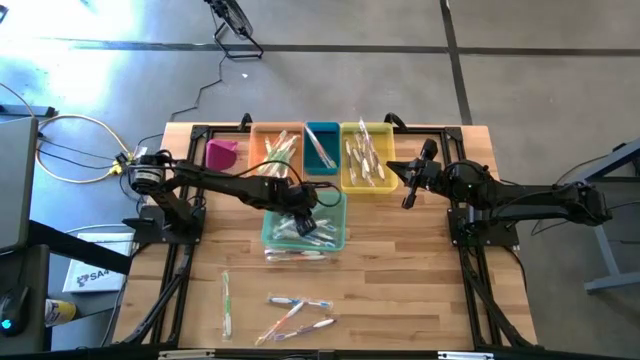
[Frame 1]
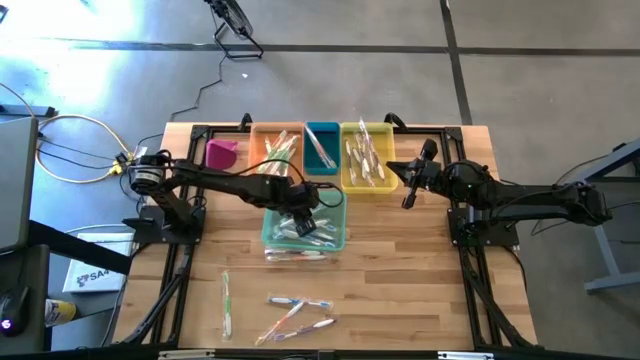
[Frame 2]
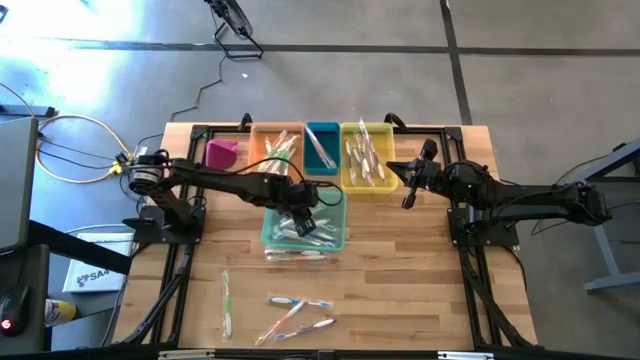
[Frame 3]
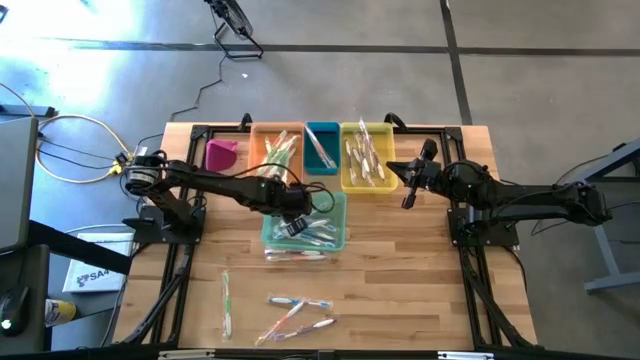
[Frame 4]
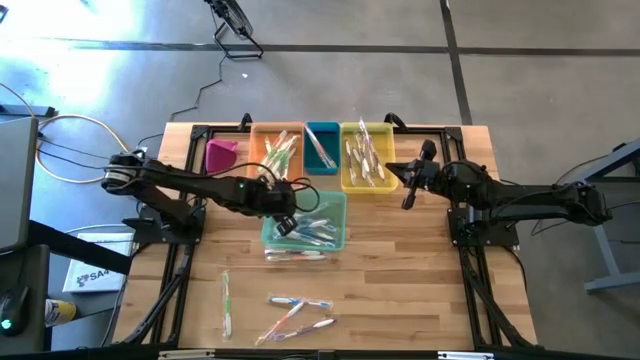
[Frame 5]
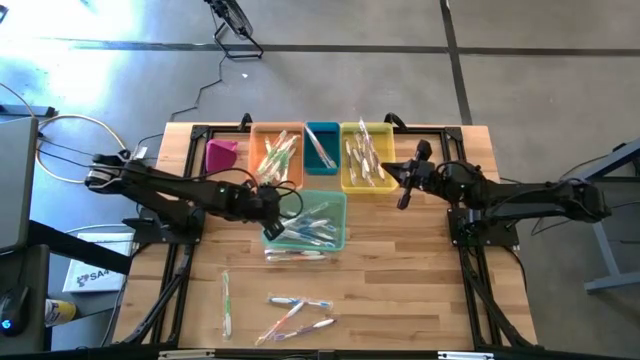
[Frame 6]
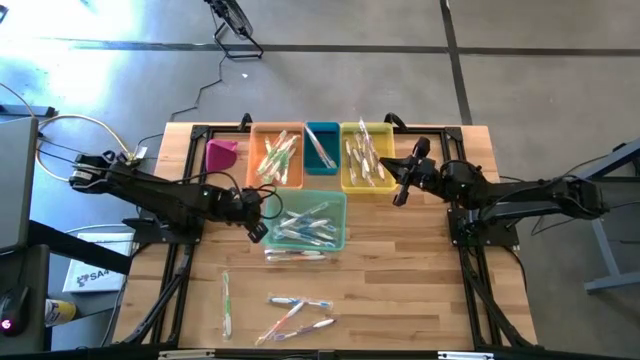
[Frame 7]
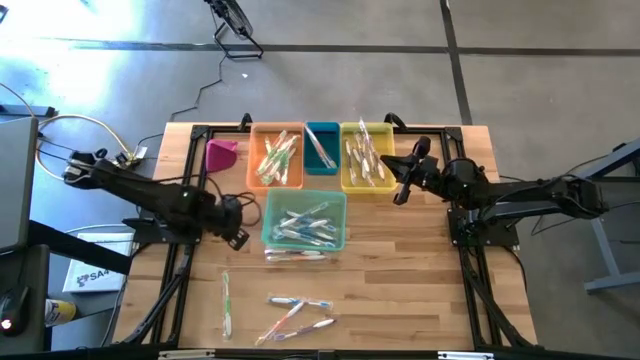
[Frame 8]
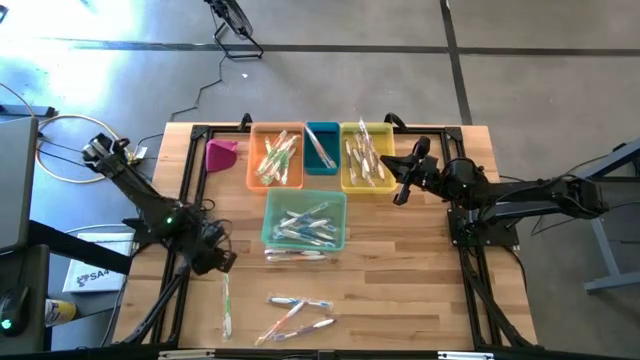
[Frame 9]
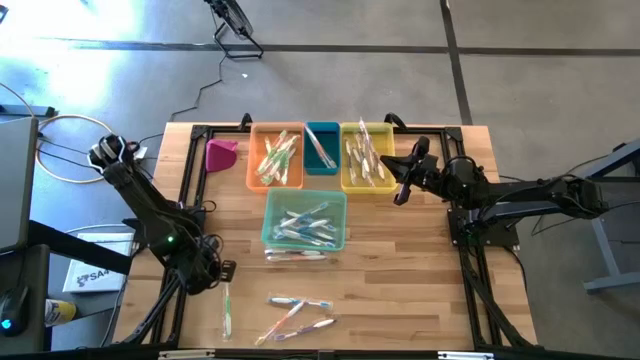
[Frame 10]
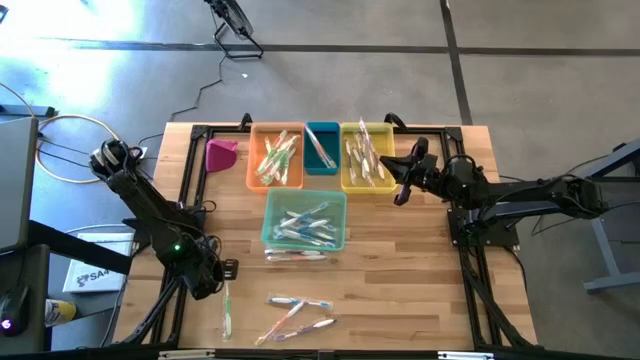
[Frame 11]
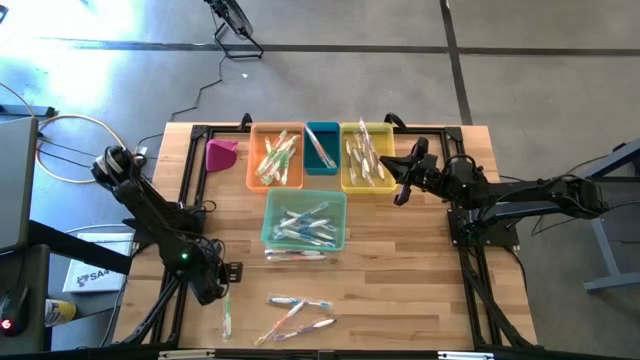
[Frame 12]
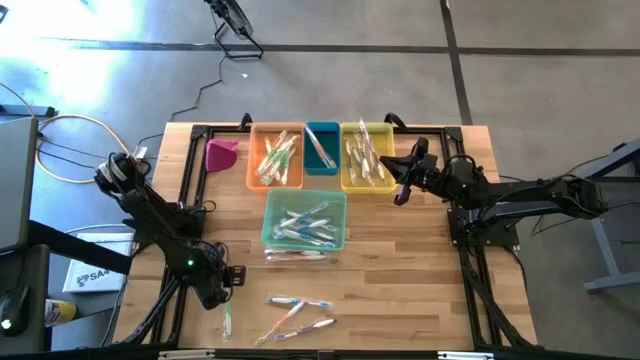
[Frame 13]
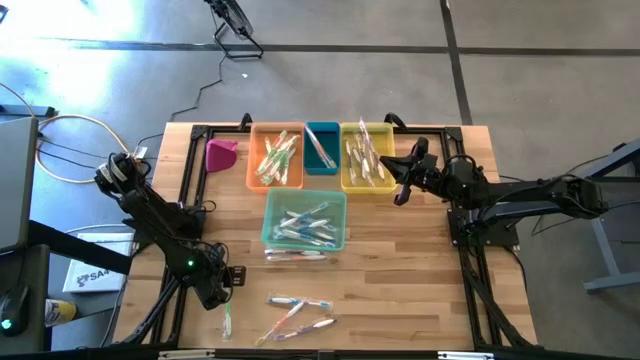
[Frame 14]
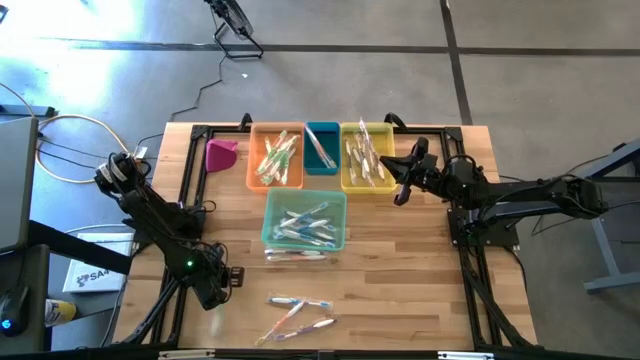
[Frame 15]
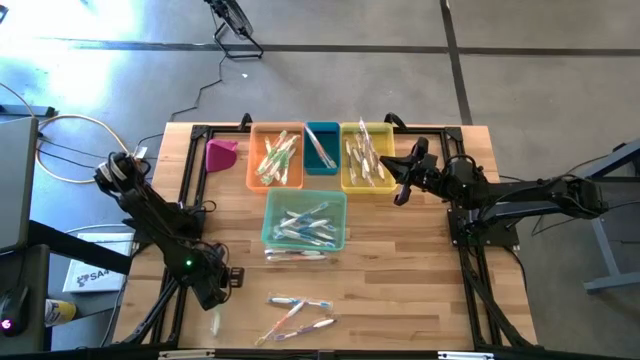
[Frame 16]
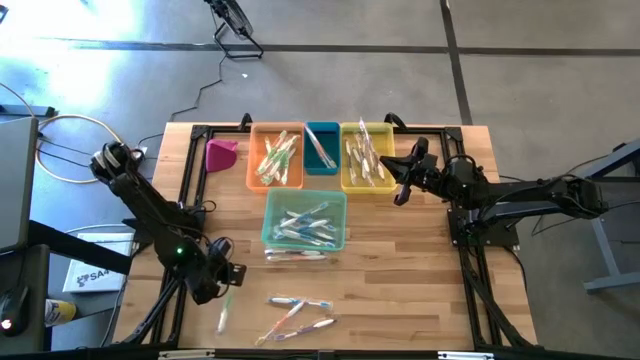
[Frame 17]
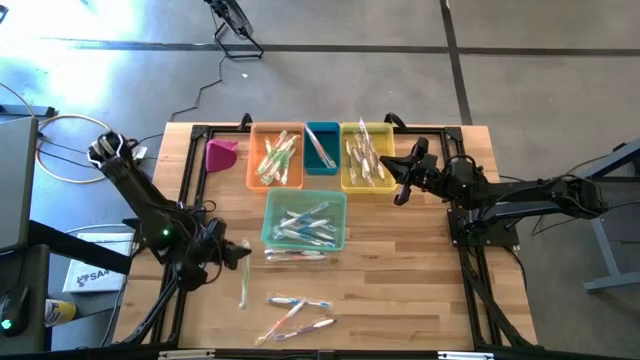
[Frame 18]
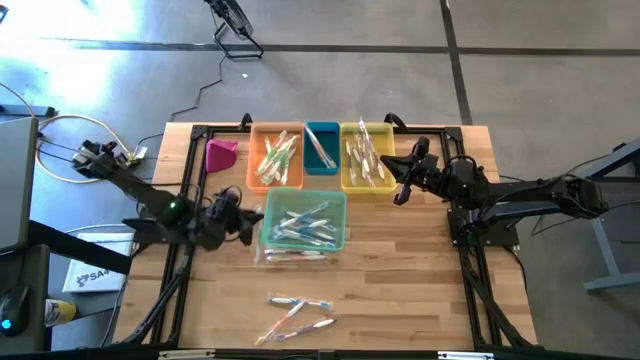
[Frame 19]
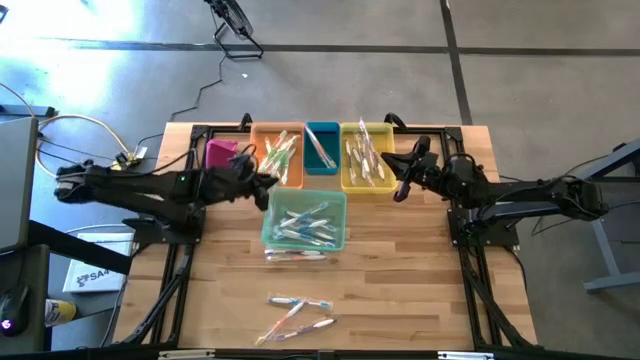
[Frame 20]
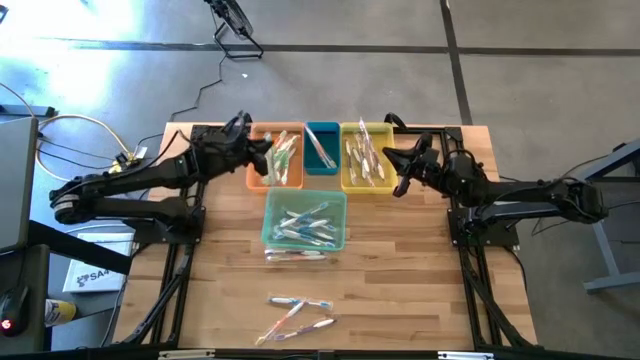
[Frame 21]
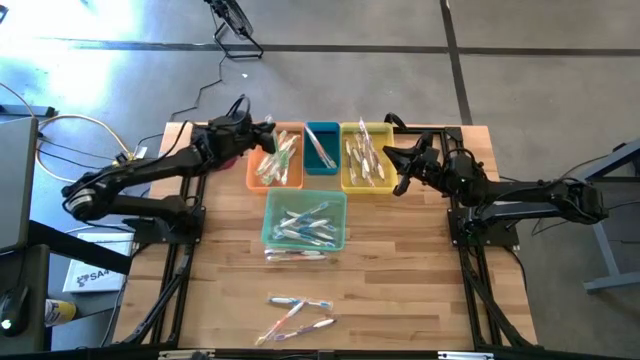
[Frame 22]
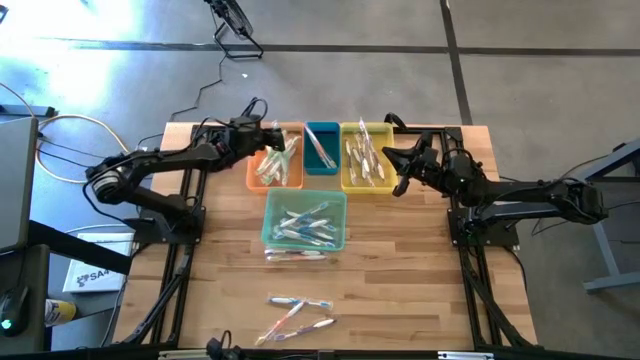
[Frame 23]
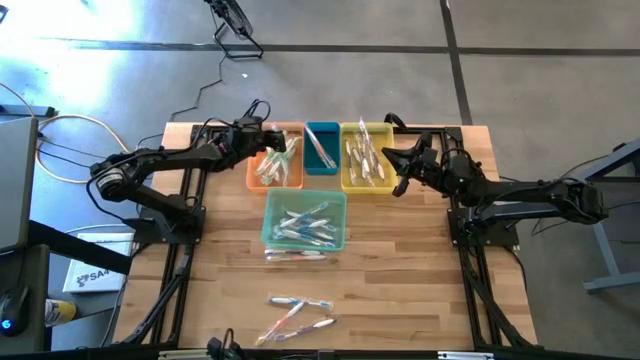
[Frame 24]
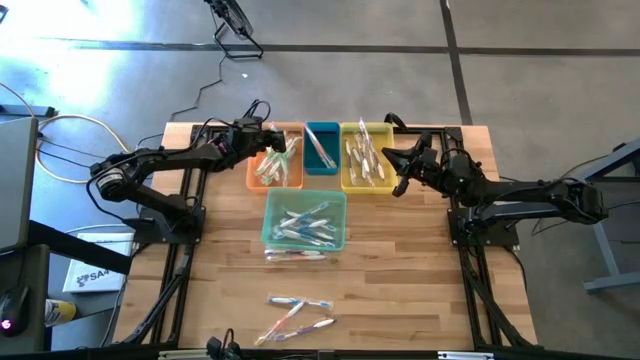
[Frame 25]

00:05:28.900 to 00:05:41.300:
Task: Pick & Place Toothbrushes
Put the green toothbrush into the orange bin
